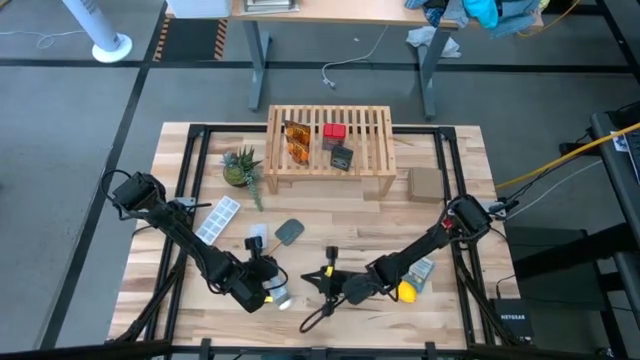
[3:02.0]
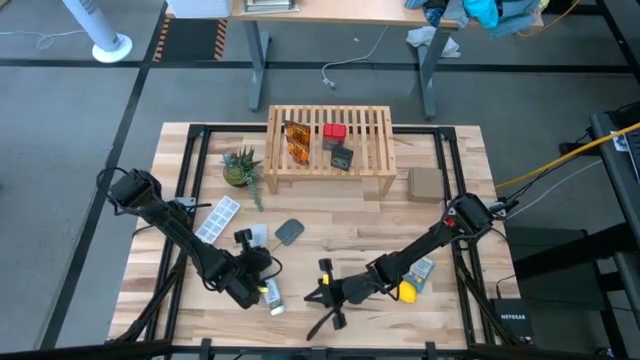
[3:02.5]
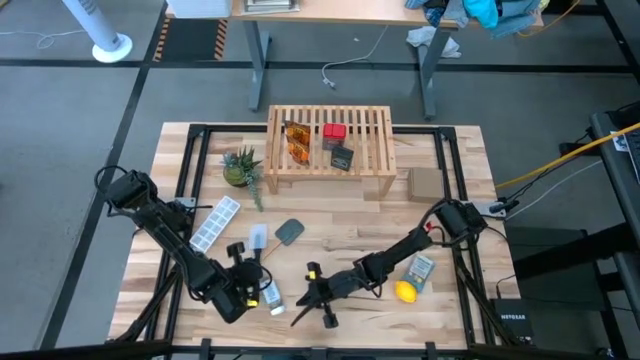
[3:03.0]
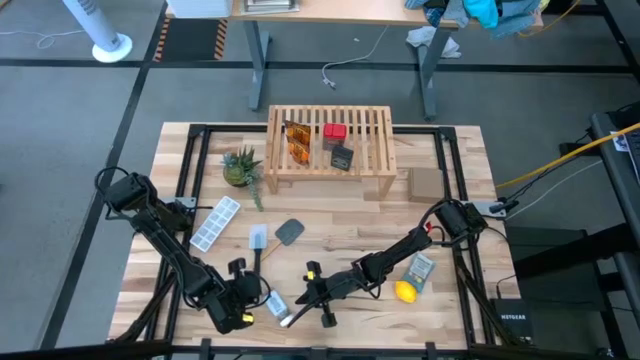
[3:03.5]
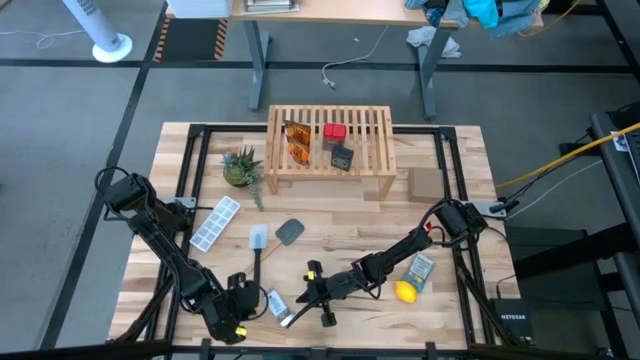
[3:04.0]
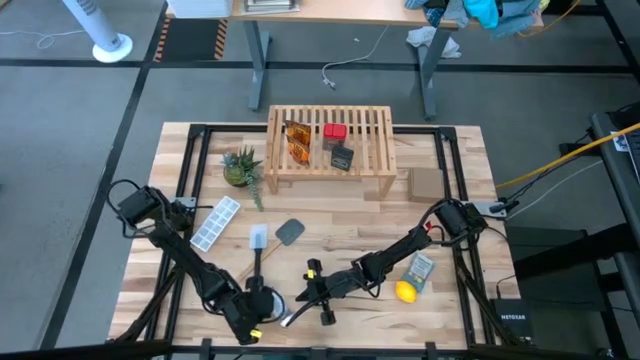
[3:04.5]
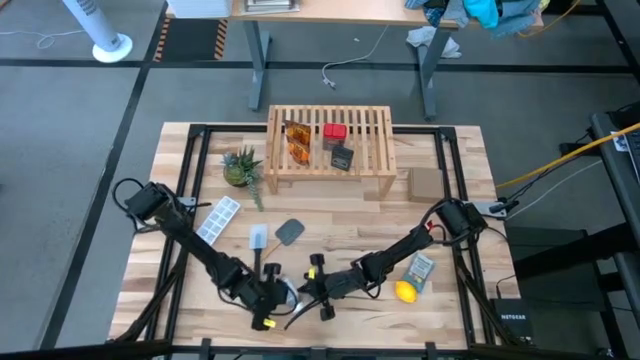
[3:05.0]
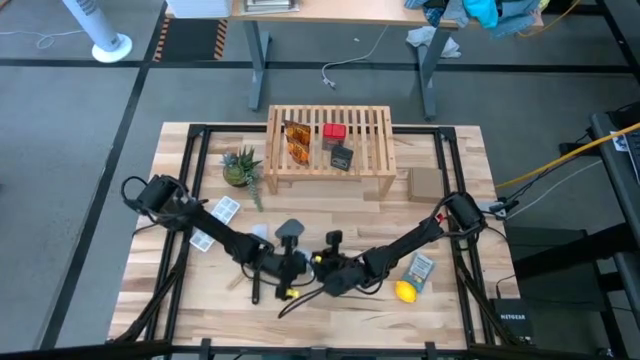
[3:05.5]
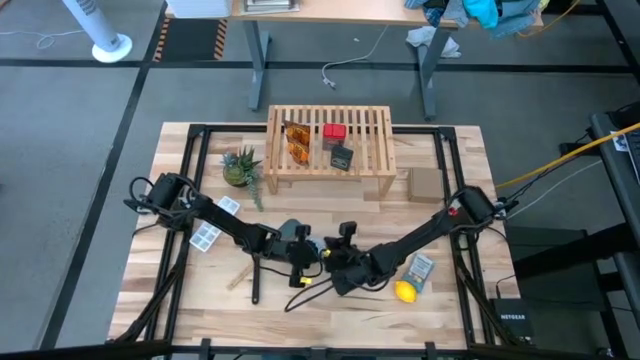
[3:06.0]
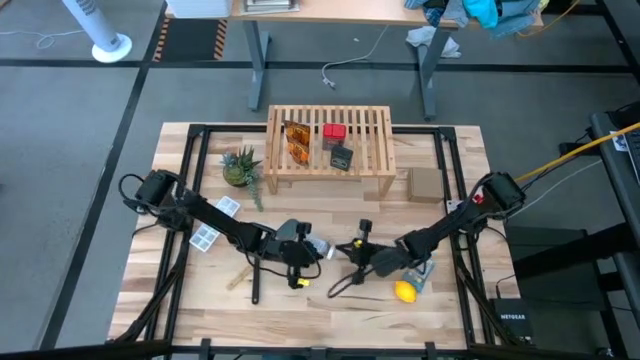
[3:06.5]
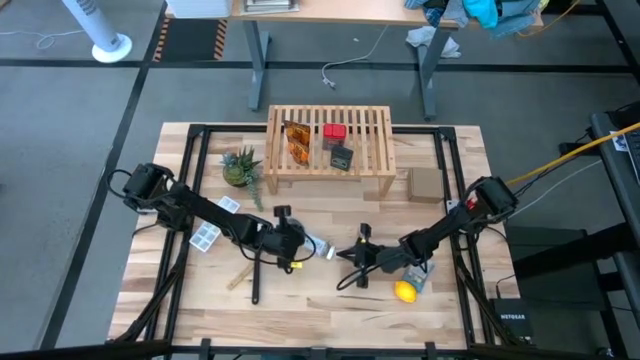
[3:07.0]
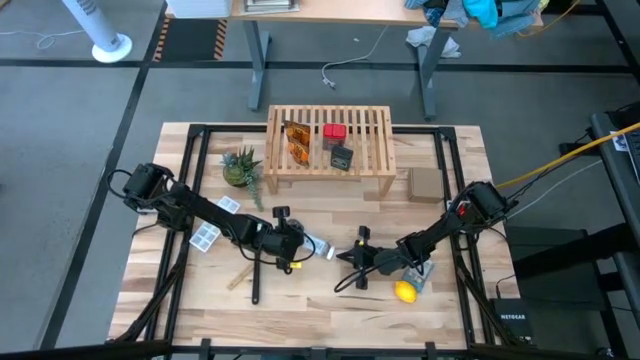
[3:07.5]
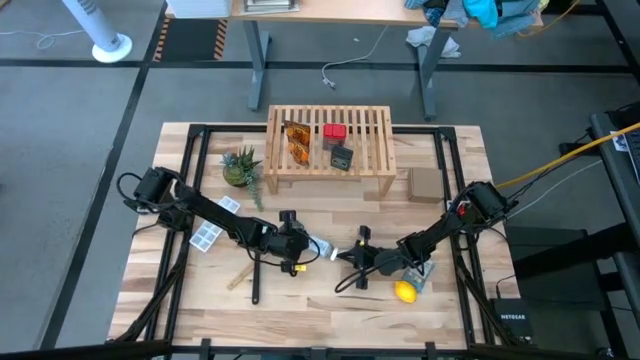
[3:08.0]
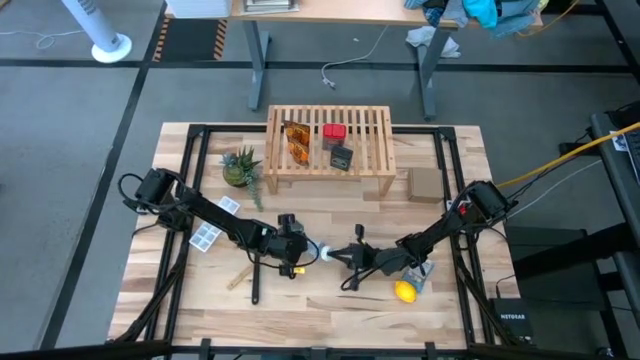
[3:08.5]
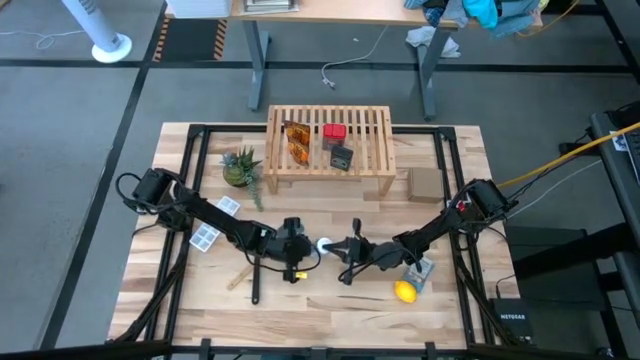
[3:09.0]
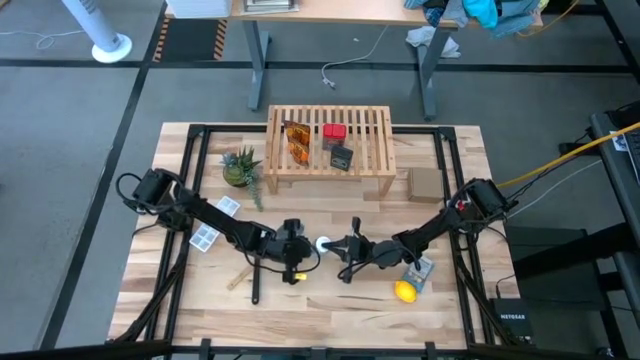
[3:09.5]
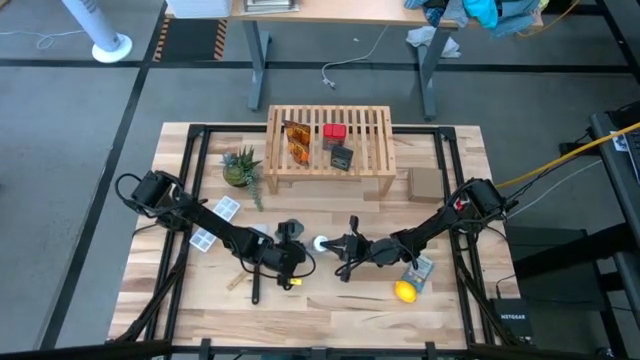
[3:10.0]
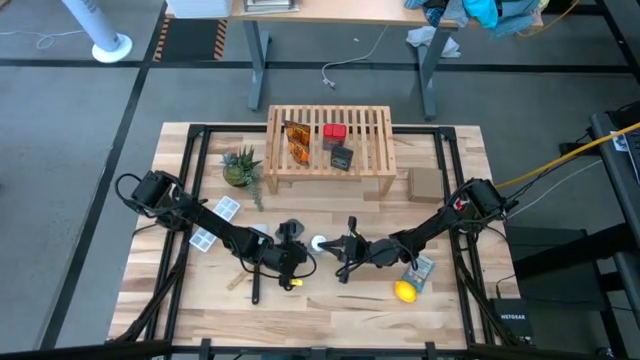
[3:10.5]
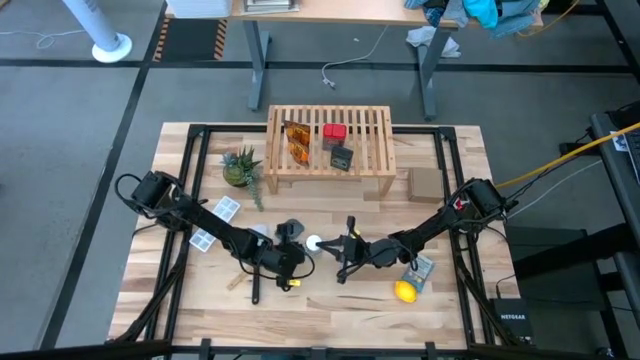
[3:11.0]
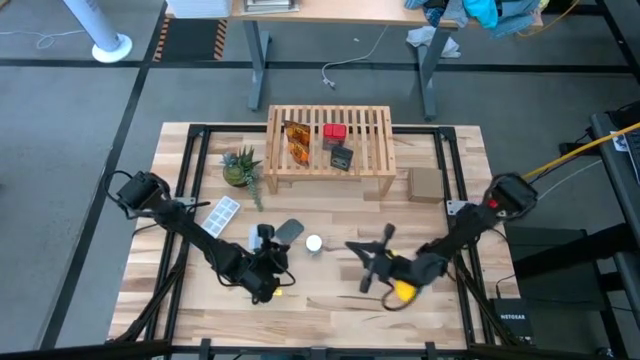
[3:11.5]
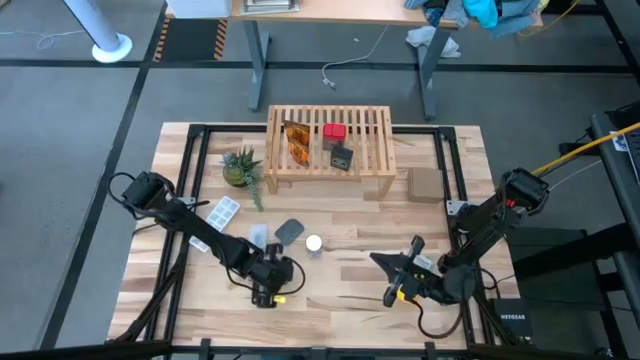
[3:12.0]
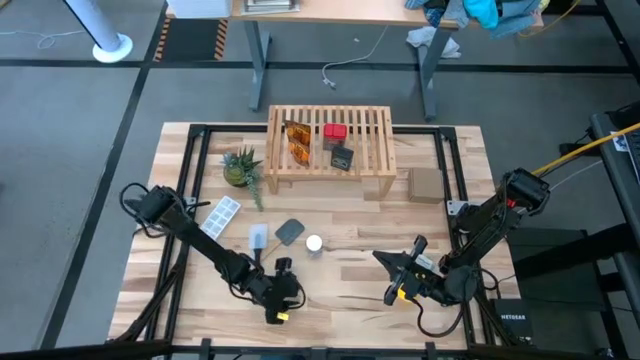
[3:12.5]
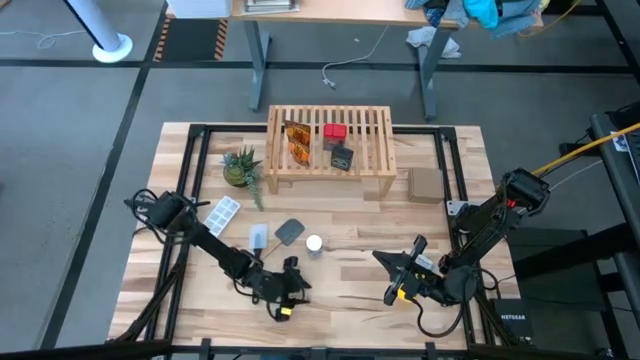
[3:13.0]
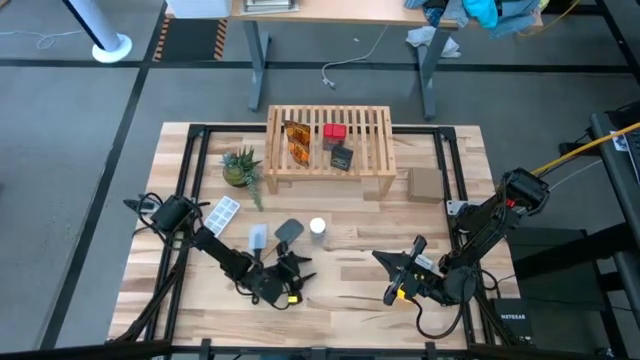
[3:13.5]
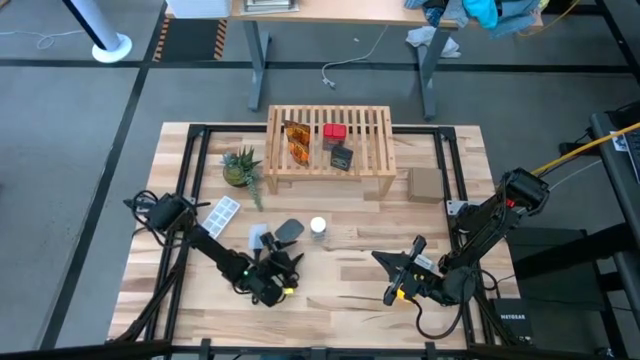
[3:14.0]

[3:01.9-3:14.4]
Task: Shelf spices
Put the white seasoning bottle on the shelf
